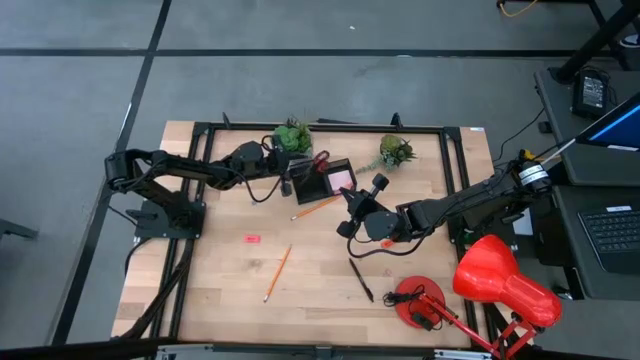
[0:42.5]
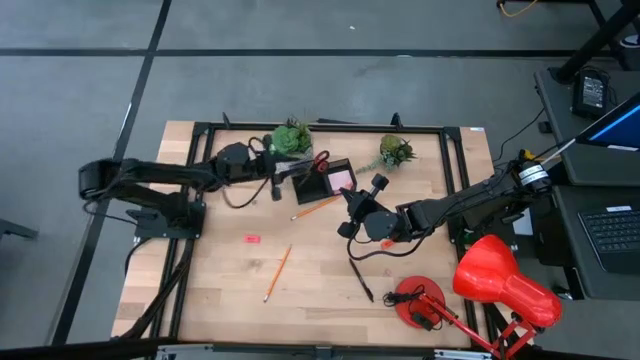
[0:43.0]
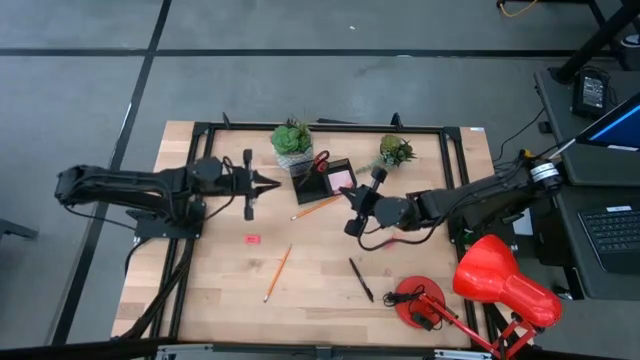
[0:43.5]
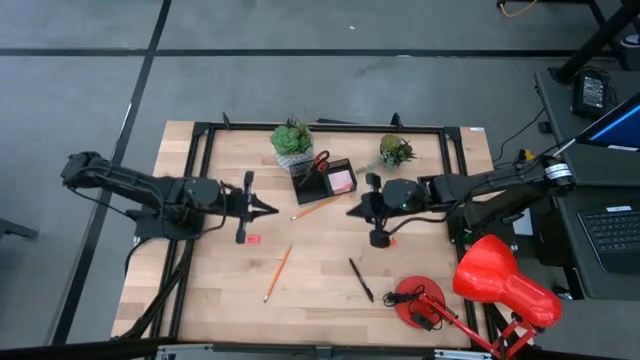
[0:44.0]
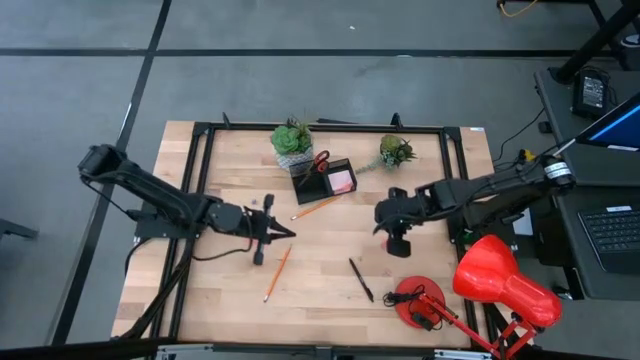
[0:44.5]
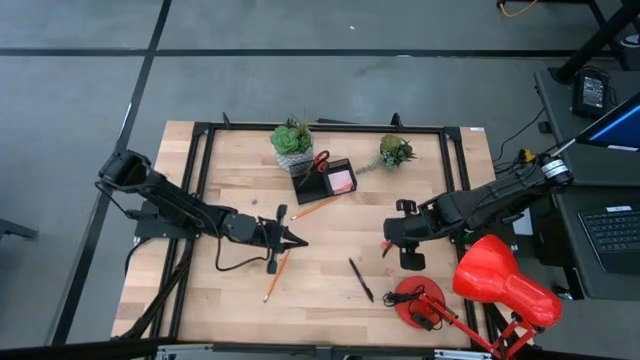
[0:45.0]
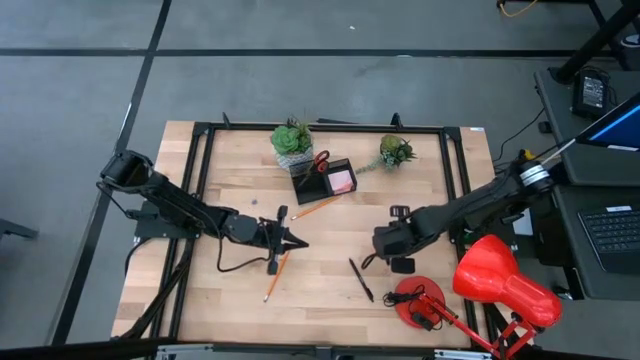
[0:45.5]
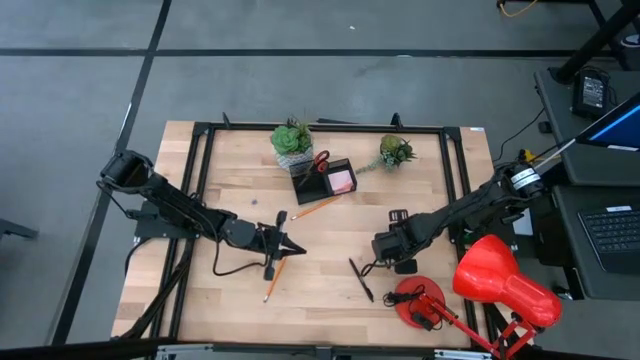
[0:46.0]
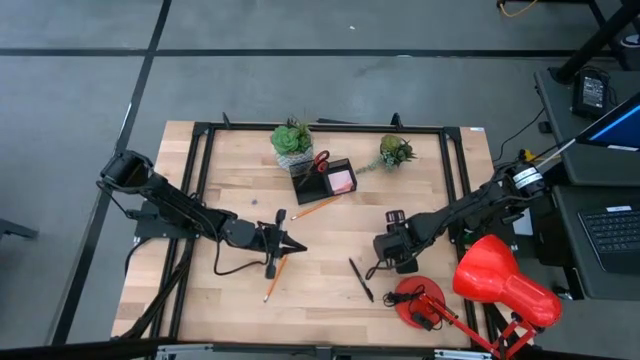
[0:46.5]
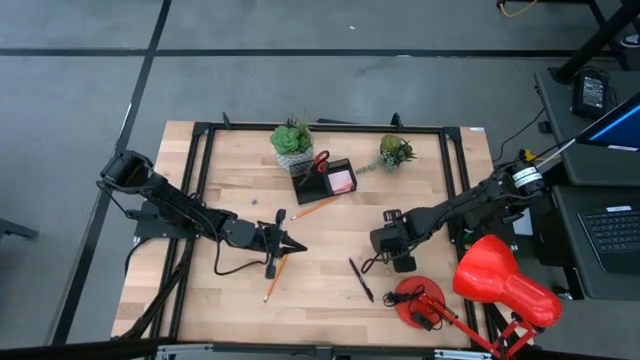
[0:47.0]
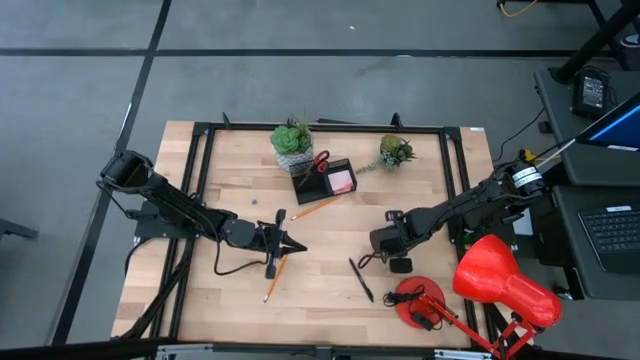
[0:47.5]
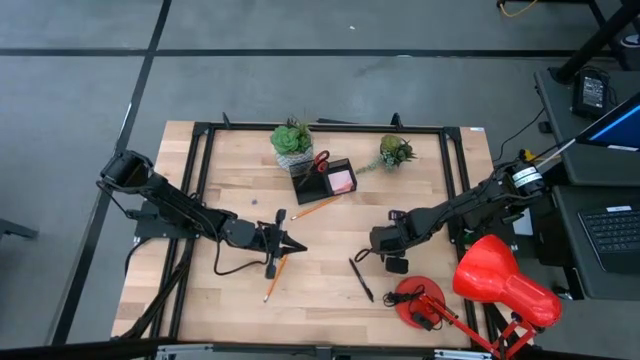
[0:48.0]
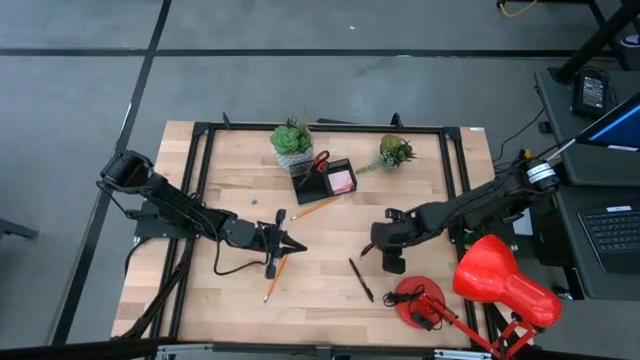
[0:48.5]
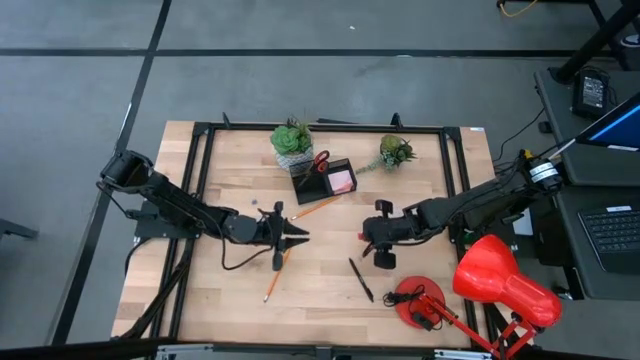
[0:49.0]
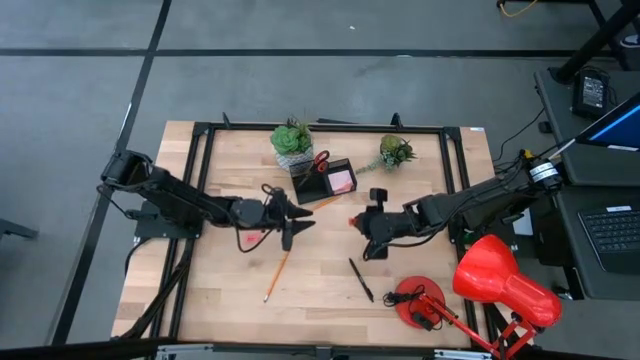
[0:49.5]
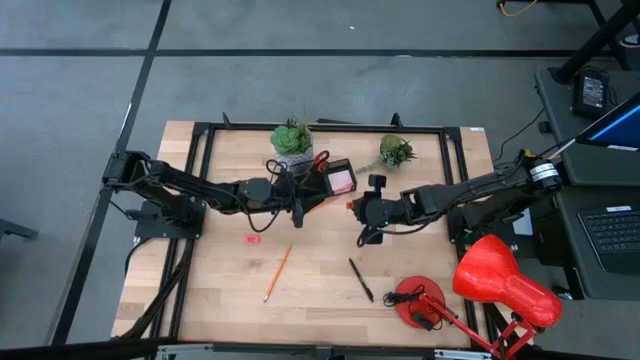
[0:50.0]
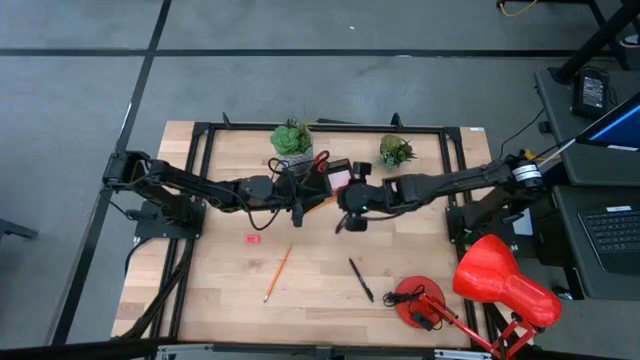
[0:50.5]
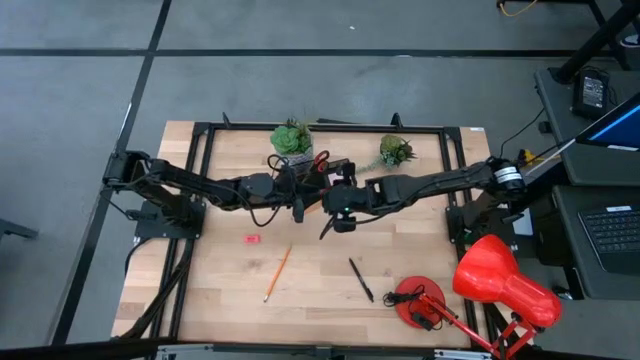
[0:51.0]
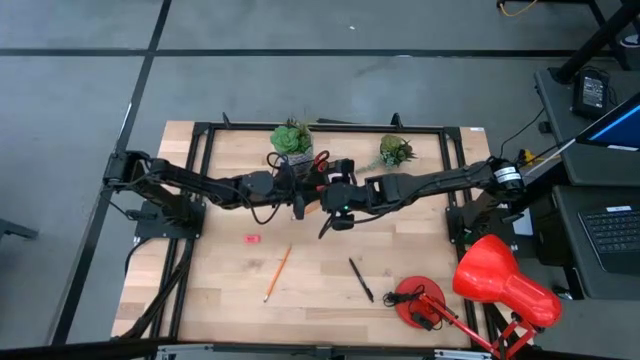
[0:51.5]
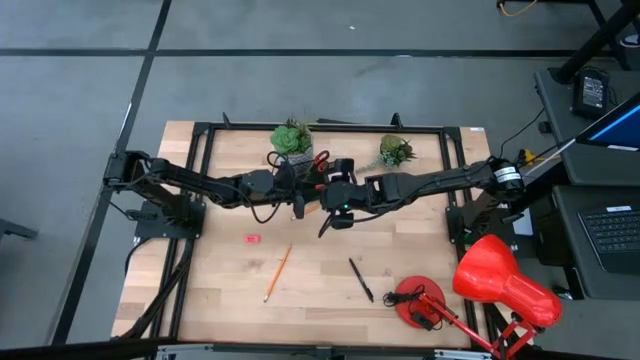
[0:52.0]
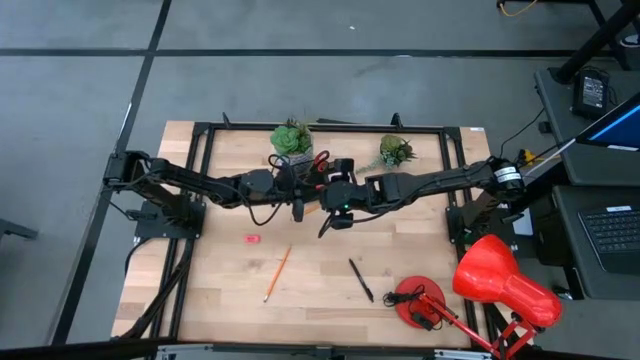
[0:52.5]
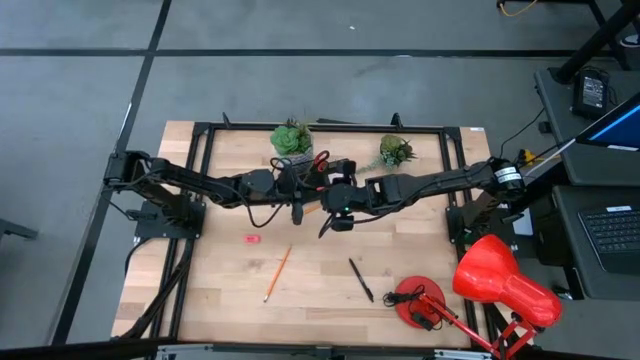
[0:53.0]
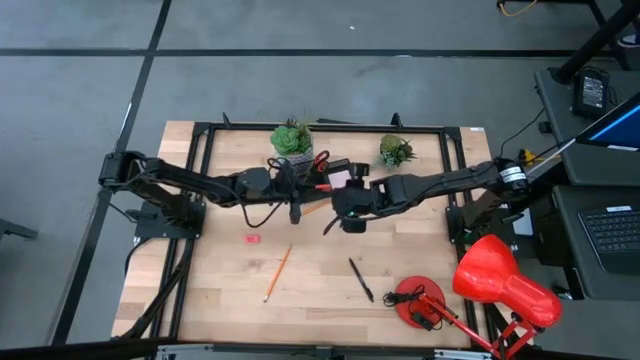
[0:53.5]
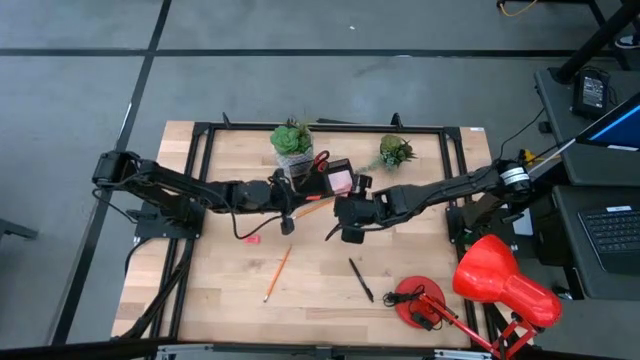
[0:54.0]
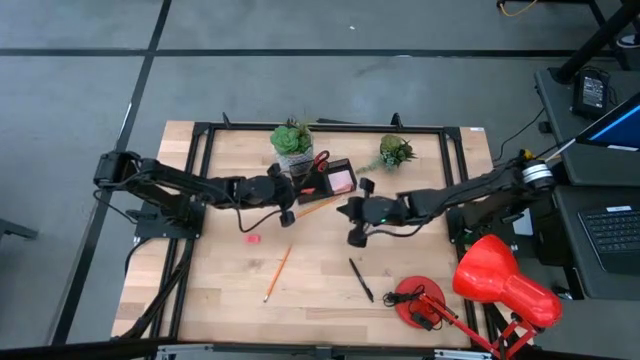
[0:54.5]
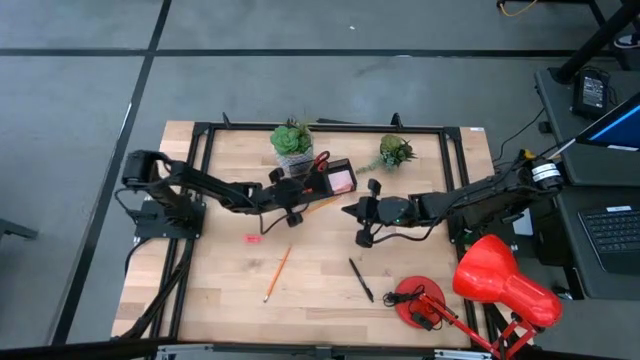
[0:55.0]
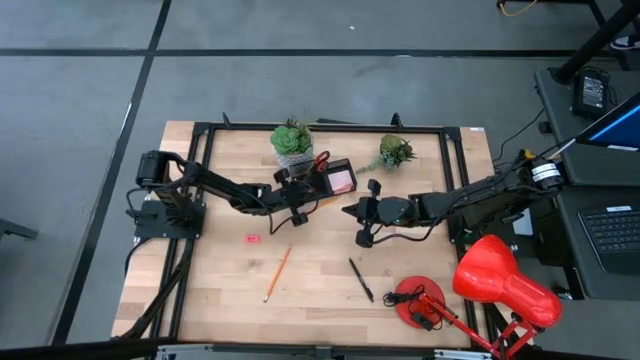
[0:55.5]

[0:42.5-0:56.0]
Task: Pick and place office supplies into organizer
Put the orange eraser into the black desk organizer

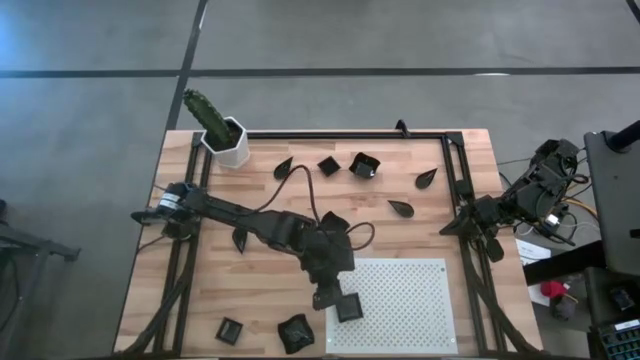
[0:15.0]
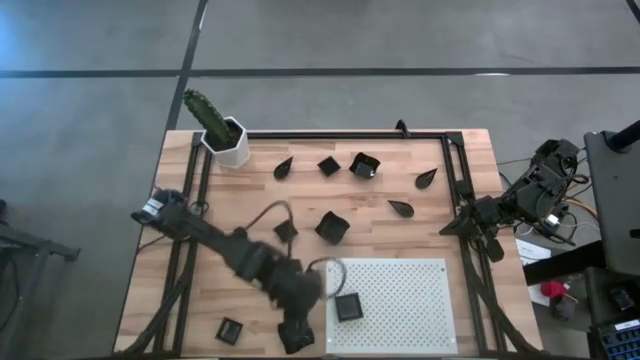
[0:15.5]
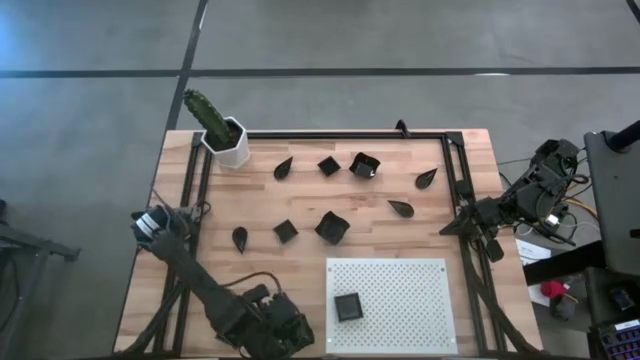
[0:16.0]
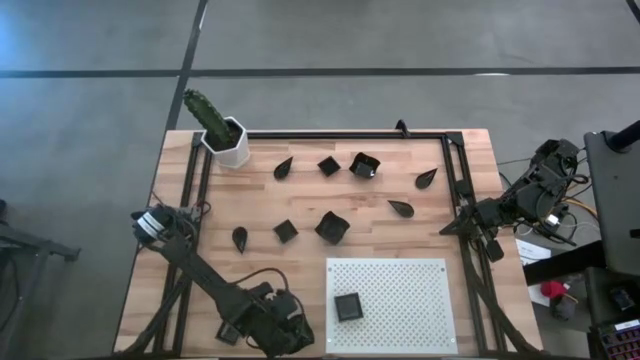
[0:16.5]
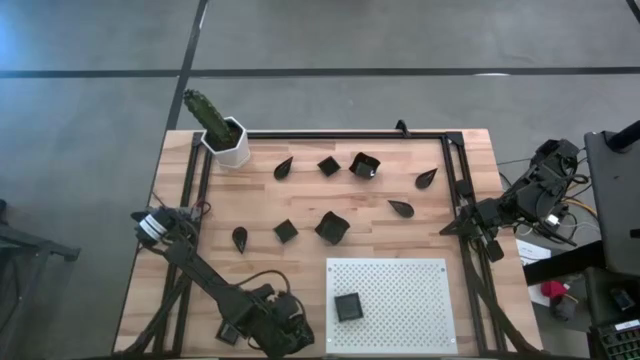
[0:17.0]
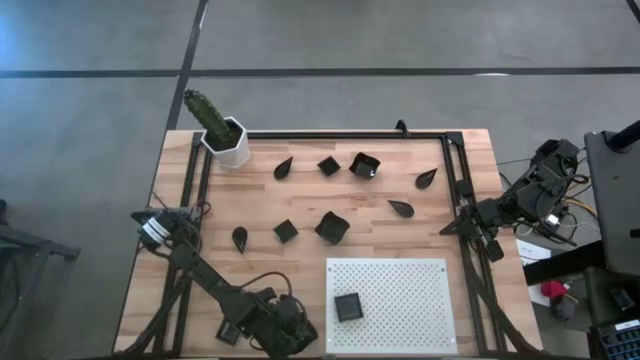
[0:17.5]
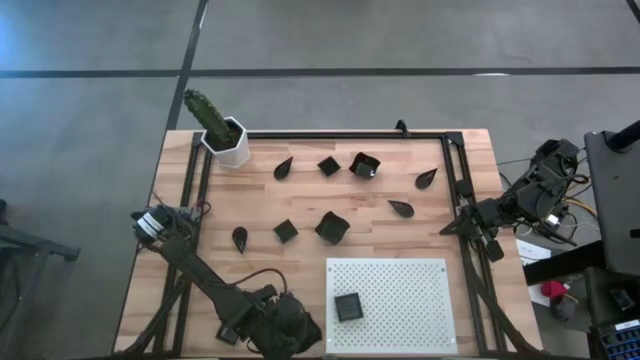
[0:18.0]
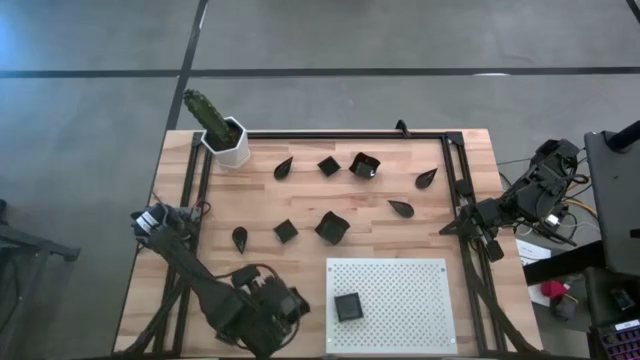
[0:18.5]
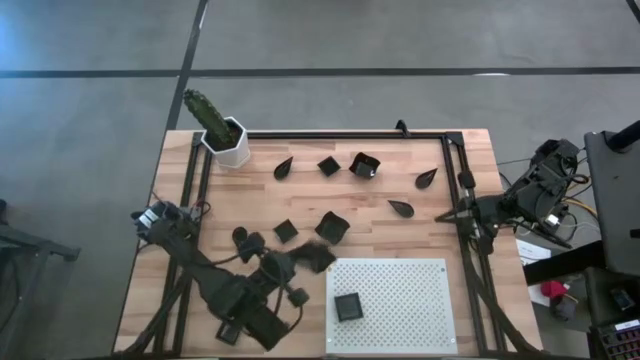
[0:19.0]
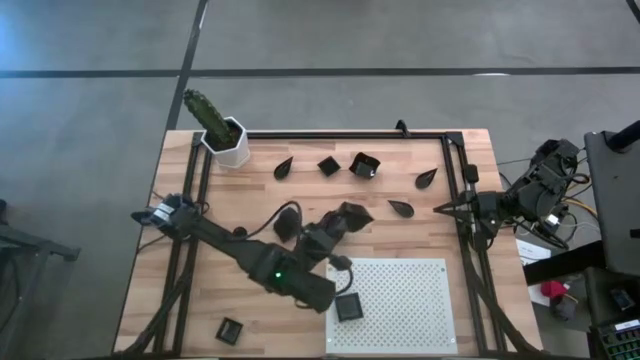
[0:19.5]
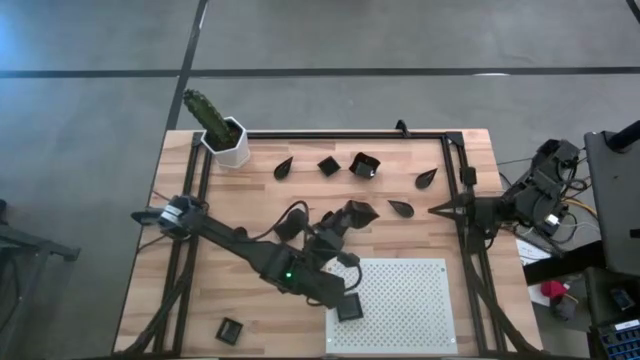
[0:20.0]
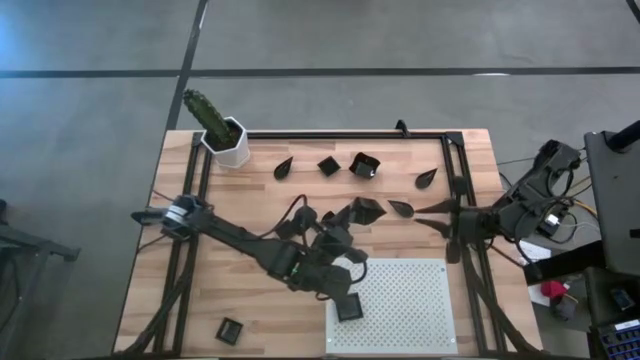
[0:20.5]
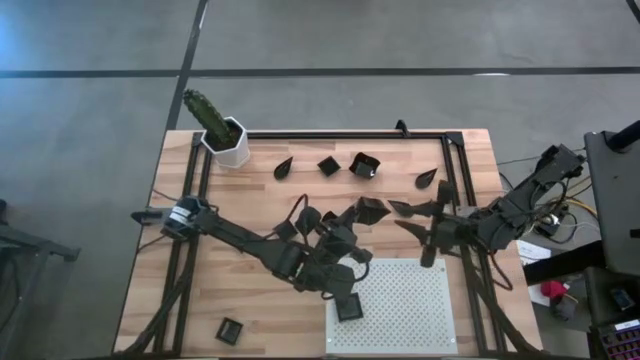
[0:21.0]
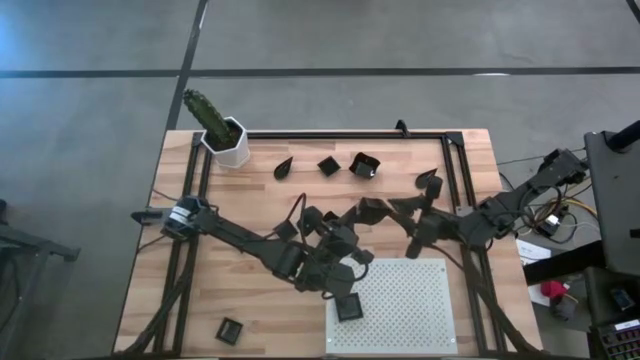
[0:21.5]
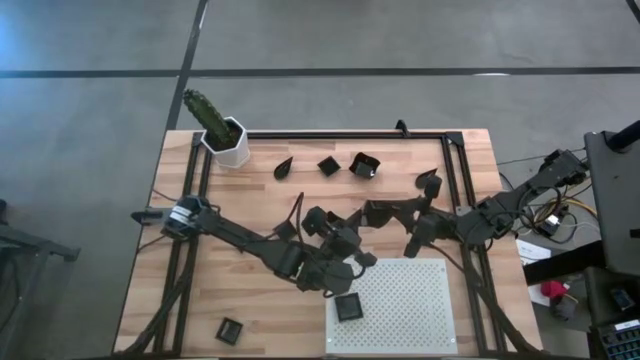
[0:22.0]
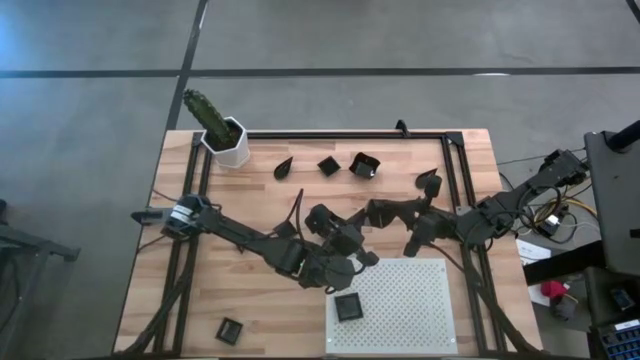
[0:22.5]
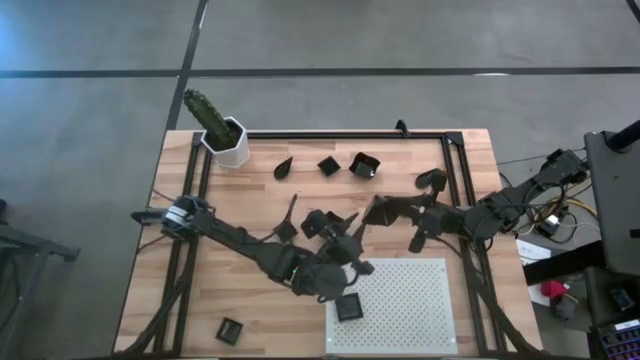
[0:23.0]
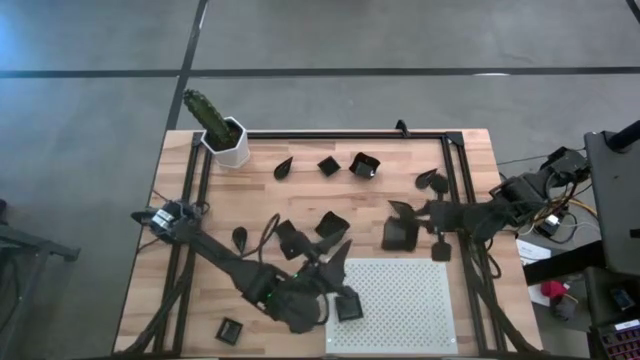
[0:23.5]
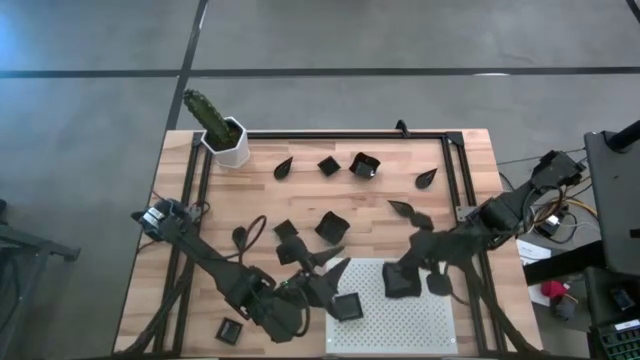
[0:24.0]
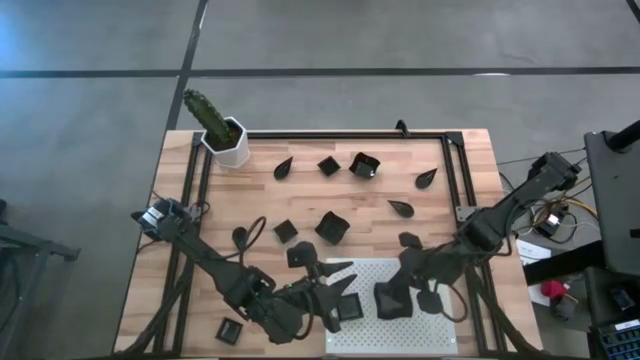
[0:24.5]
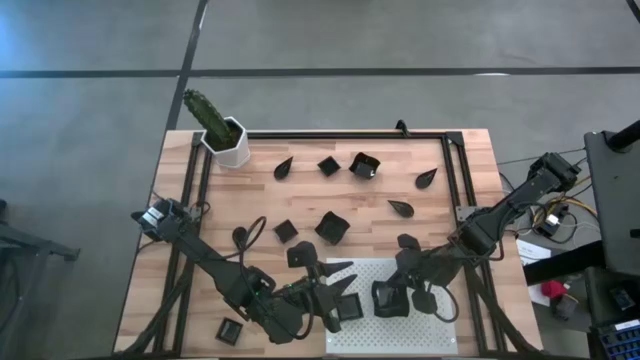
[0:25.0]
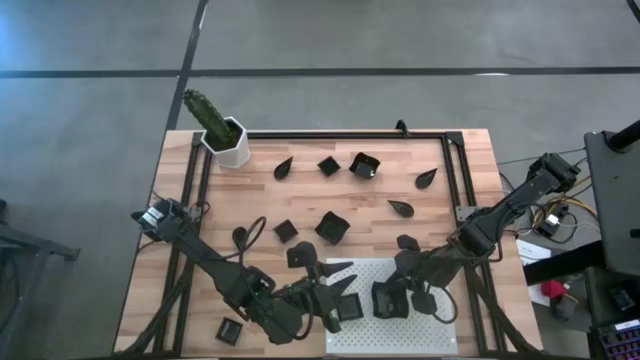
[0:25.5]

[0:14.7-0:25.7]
Task: Pick & Place Mini shaped plates
Put the distorted square plate on the shelf
